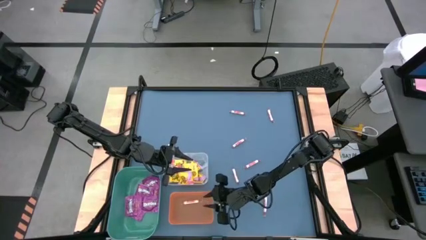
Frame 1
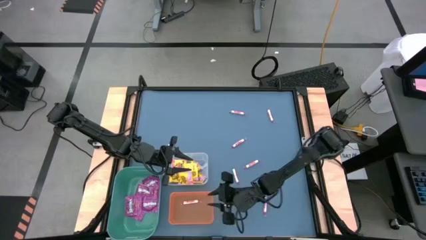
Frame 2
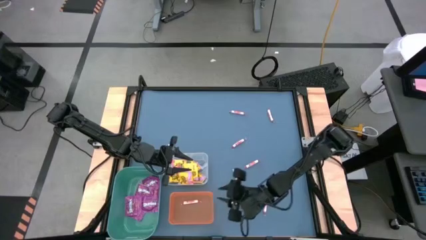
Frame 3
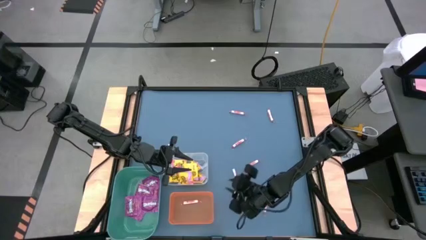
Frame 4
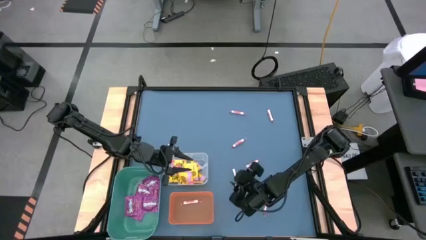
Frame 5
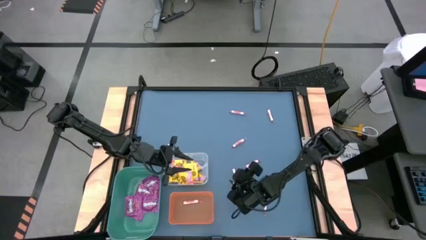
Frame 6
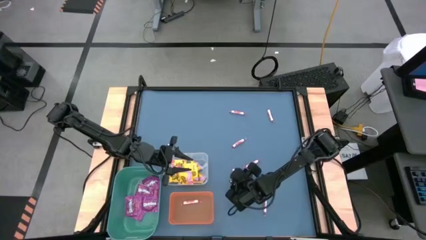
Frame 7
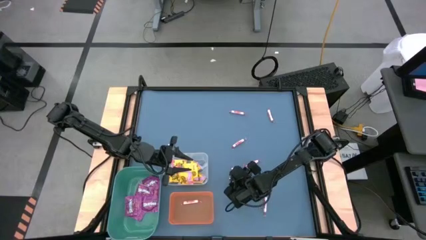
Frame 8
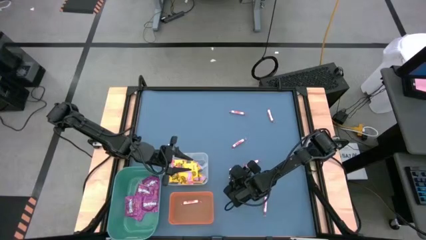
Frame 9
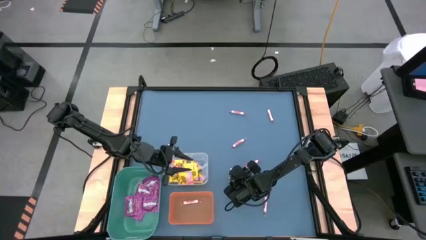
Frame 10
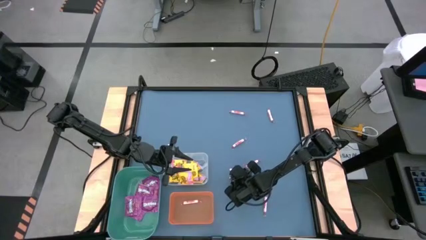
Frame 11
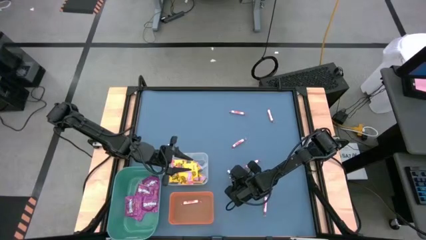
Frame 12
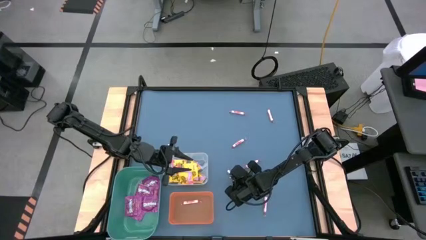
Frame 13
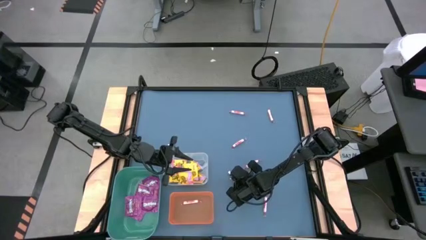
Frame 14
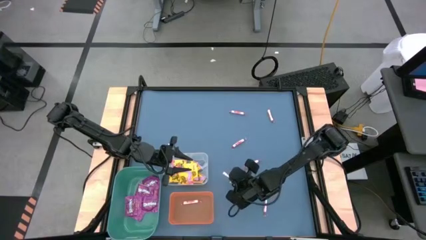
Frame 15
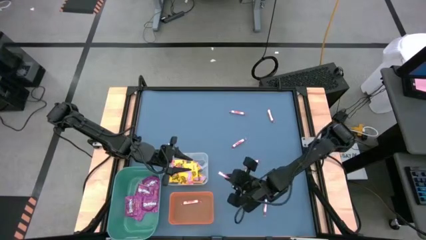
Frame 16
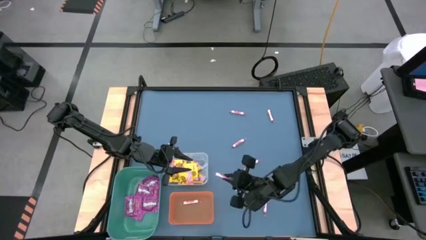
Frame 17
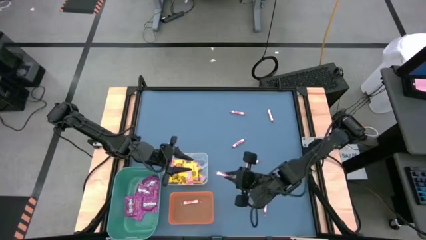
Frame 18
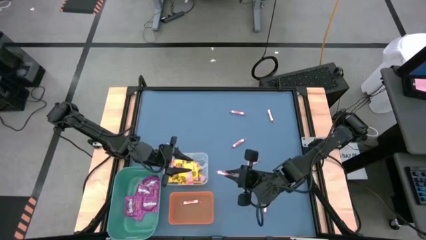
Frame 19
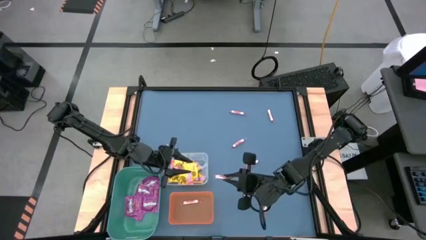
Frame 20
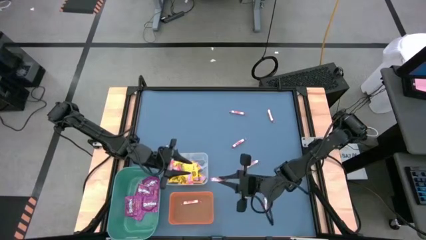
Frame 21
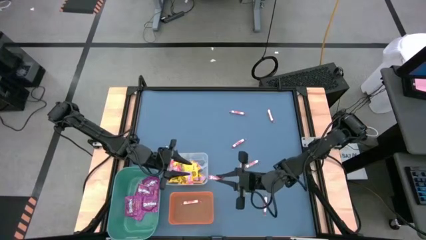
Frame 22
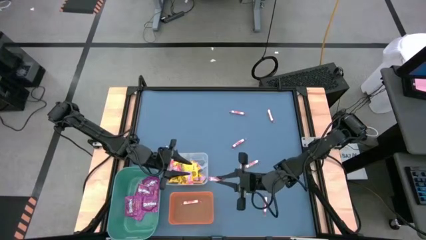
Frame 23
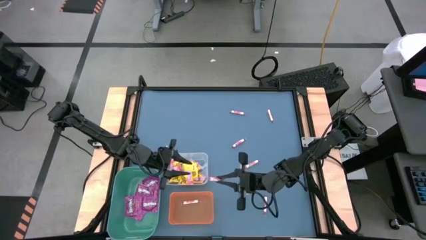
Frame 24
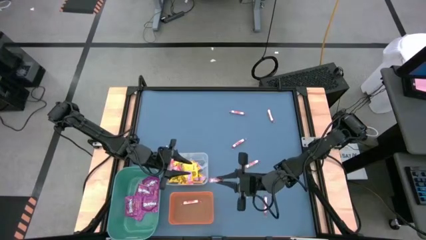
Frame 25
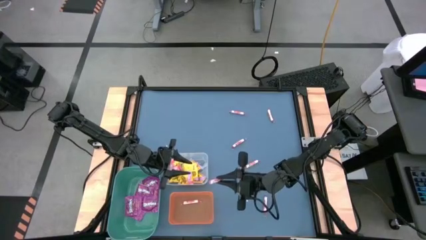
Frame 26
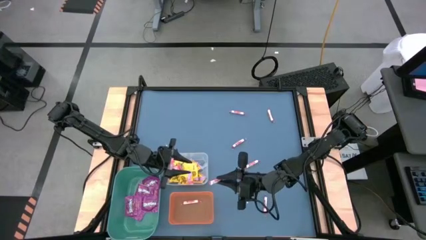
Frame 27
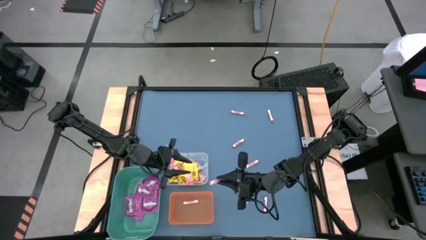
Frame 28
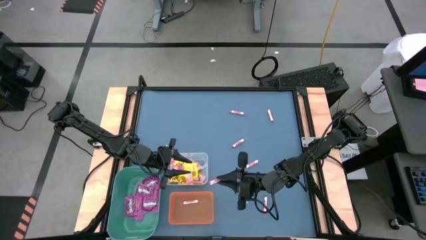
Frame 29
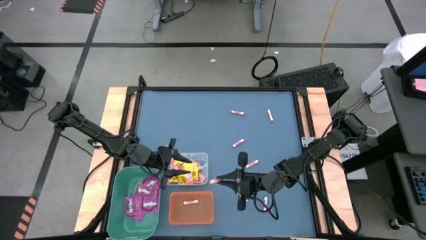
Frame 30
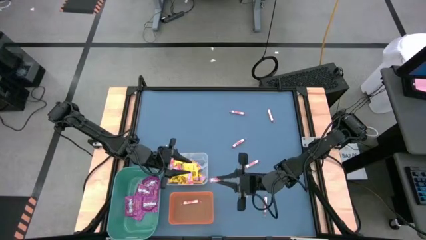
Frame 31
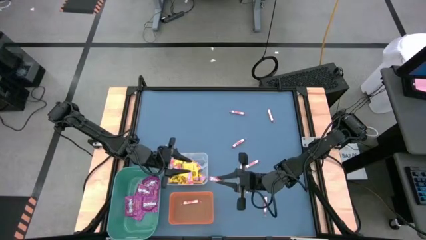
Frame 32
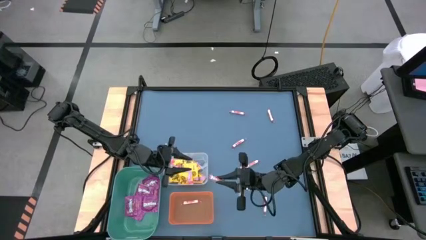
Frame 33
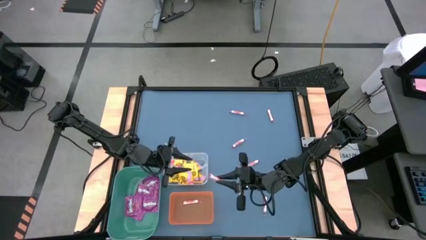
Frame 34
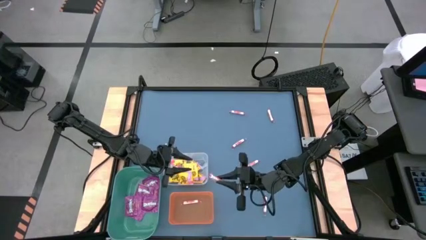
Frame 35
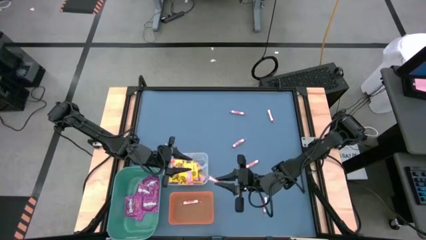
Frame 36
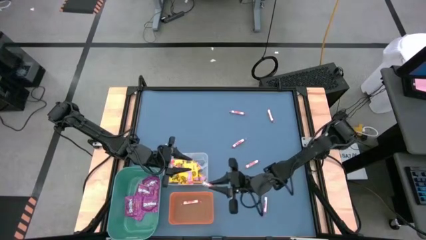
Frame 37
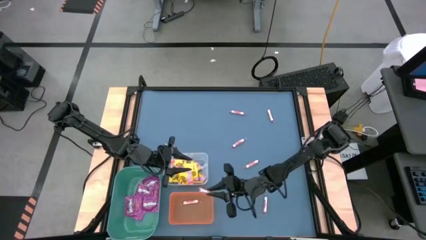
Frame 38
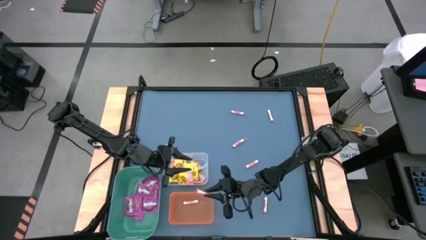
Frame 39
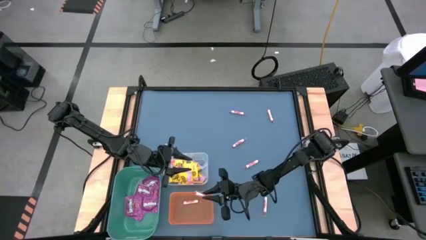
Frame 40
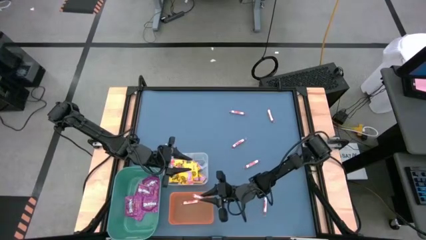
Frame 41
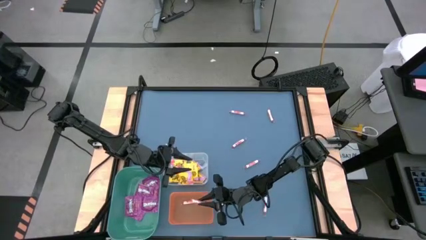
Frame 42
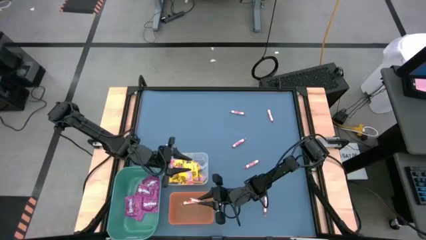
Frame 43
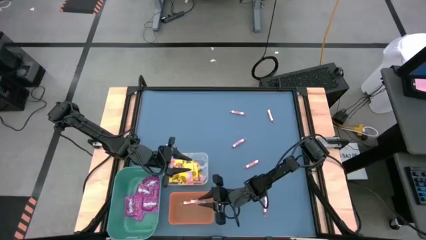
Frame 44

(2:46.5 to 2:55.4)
Task: Sort candy
Put the red candy into the orange bin

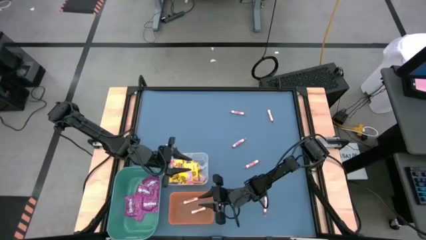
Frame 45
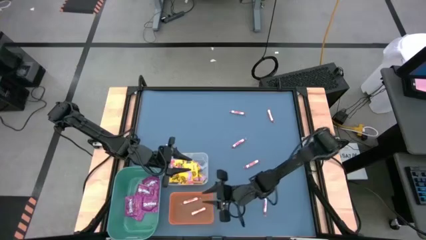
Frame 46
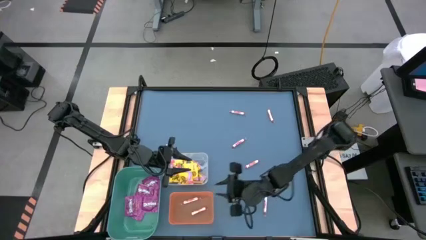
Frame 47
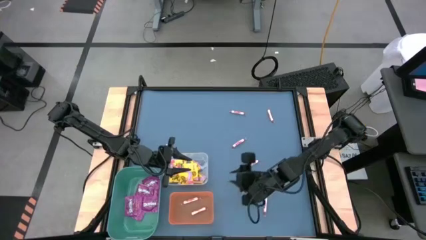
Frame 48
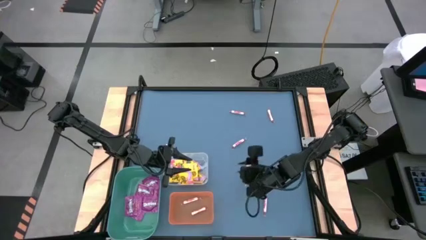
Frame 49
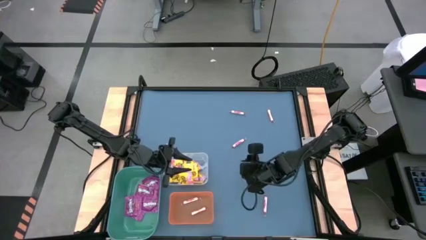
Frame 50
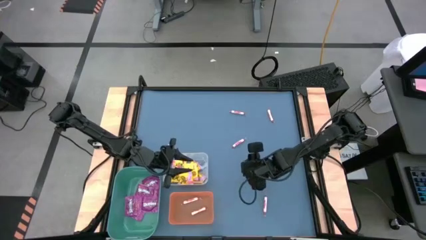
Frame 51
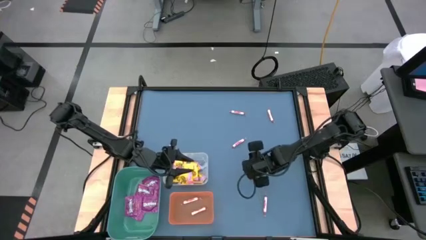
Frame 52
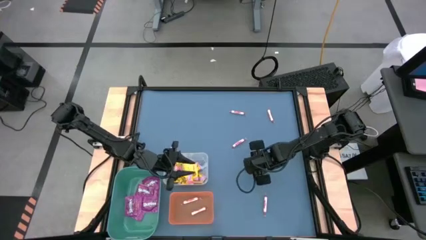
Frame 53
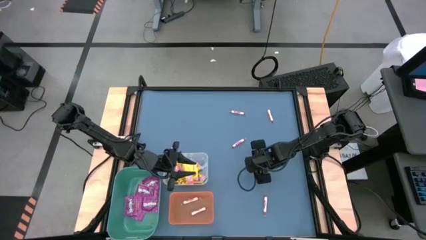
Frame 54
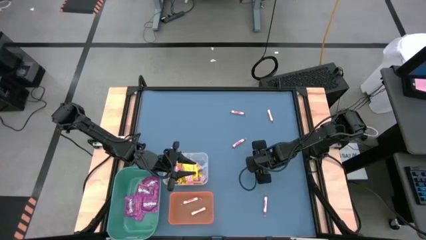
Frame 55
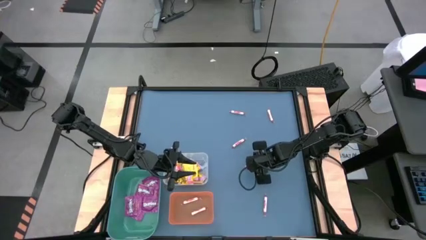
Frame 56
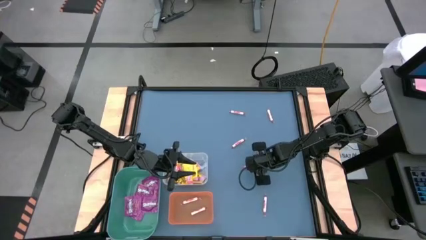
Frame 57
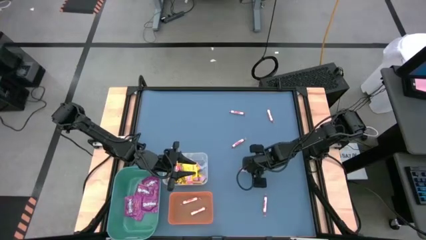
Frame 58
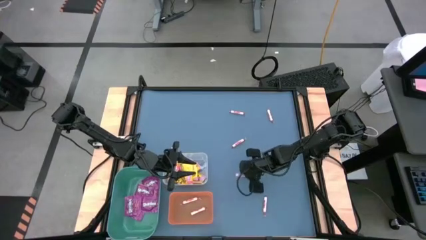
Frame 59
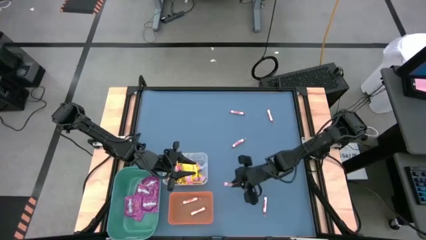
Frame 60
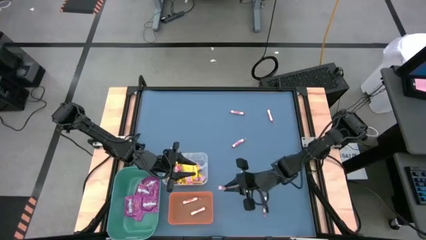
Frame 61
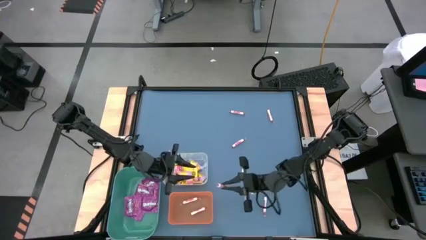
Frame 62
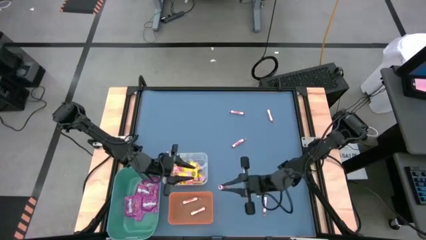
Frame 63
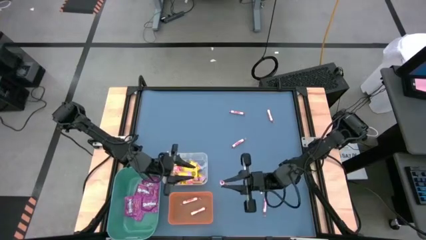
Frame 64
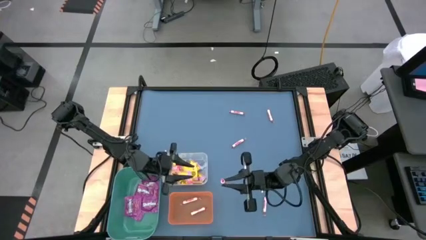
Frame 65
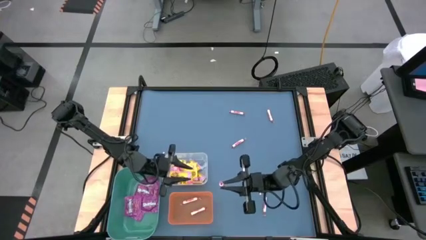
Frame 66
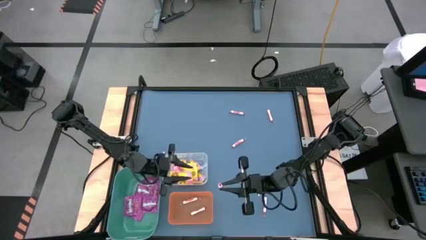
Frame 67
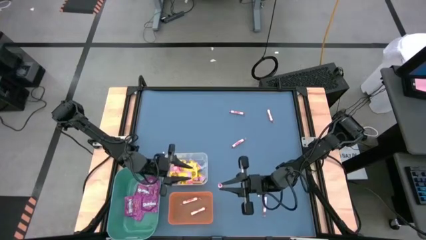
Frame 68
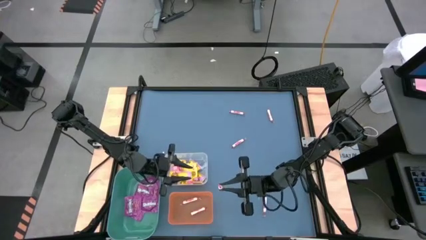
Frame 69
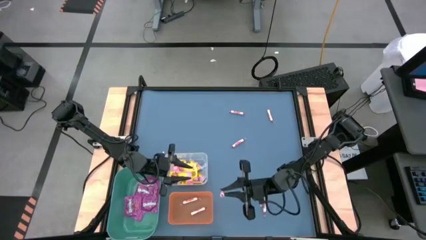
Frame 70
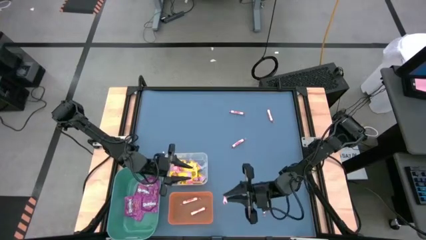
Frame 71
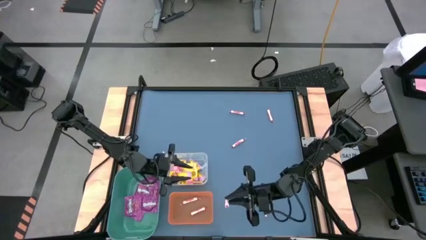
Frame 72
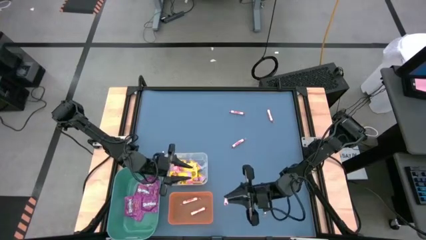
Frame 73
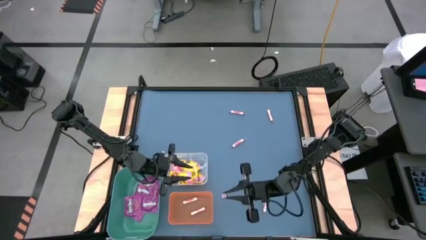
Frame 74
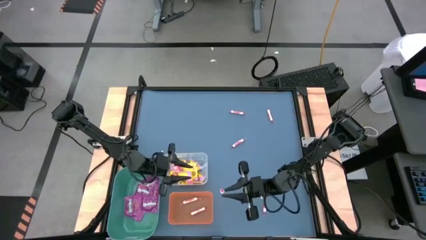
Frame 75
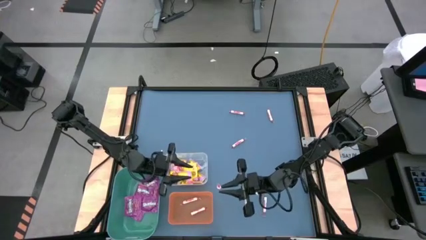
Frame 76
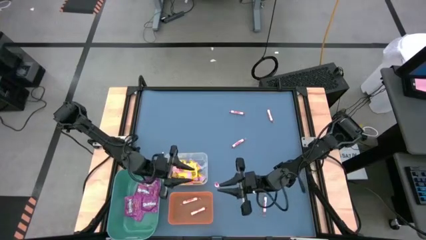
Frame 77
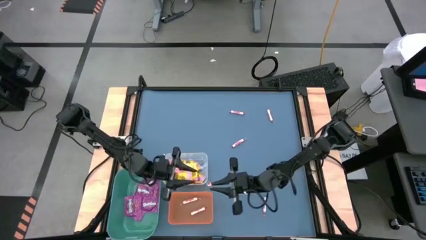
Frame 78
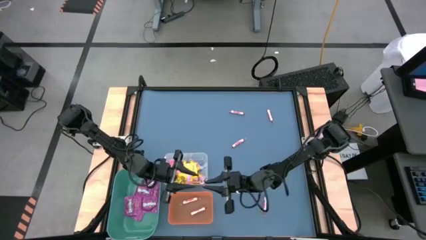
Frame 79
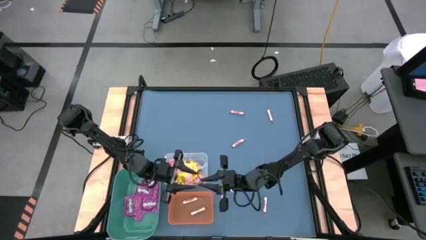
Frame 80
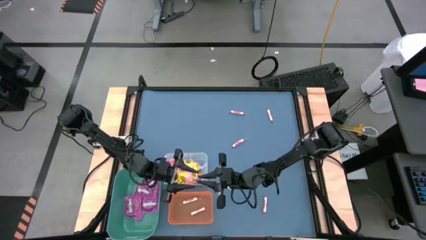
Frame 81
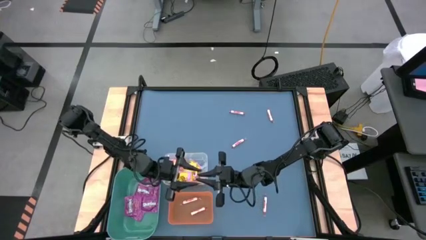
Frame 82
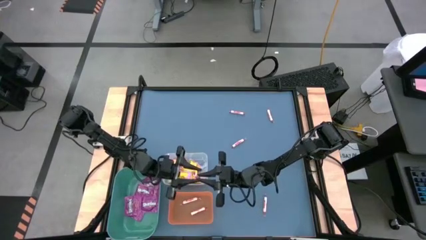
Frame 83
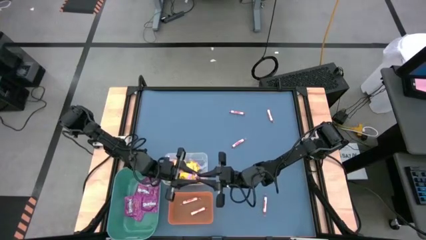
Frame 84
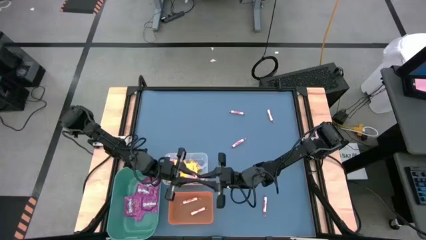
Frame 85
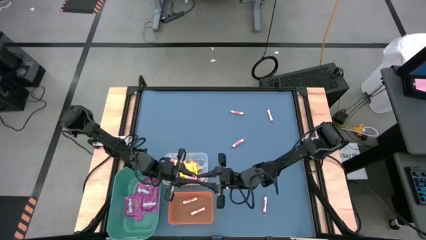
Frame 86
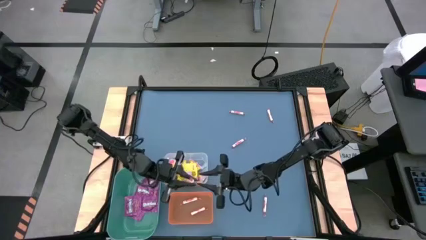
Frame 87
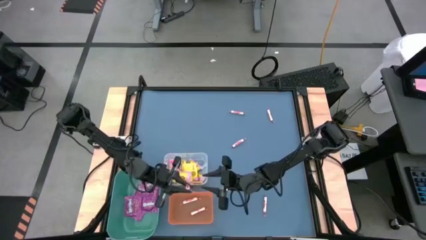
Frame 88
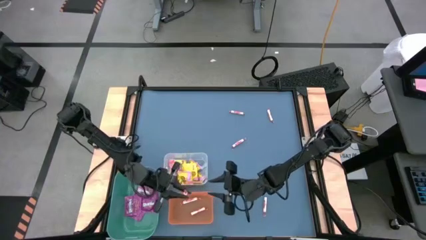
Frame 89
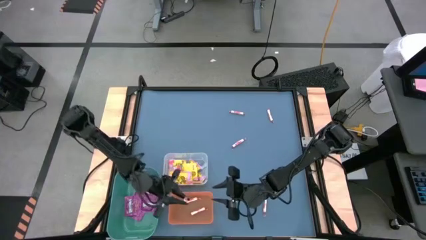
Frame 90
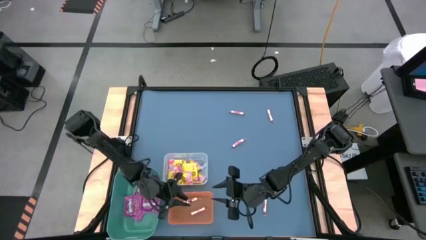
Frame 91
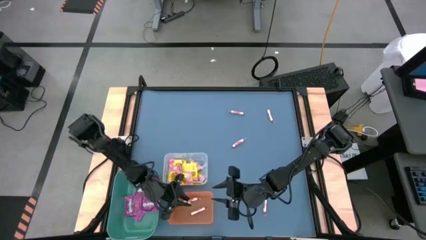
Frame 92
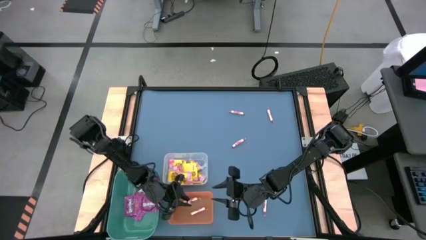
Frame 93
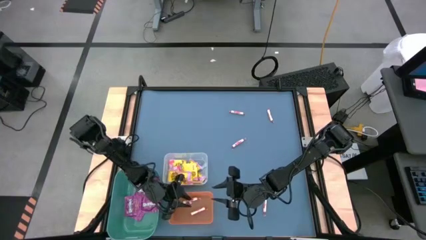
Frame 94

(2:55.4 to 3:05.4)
Put the red candy into the orange bin
